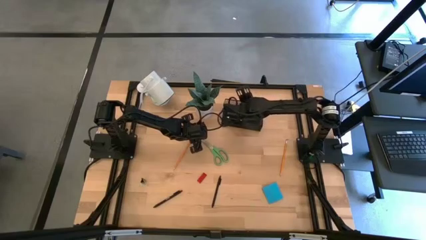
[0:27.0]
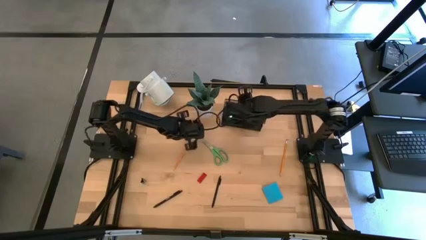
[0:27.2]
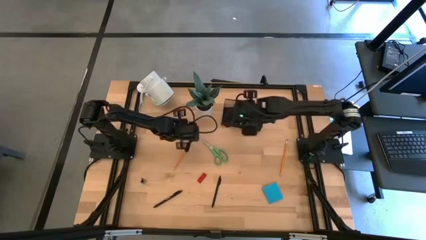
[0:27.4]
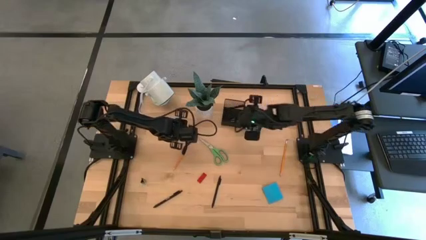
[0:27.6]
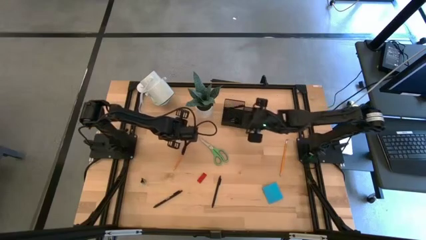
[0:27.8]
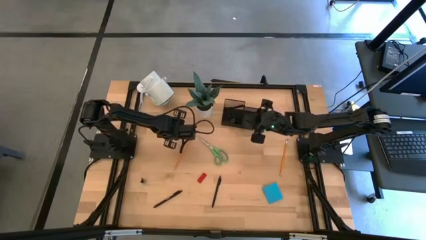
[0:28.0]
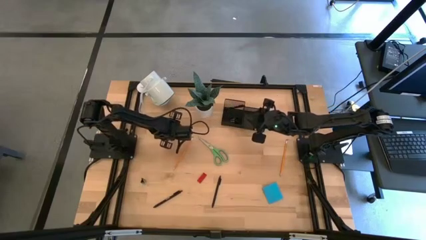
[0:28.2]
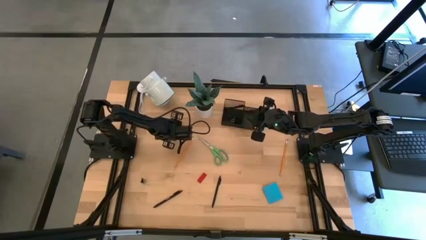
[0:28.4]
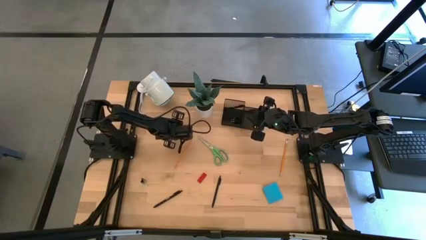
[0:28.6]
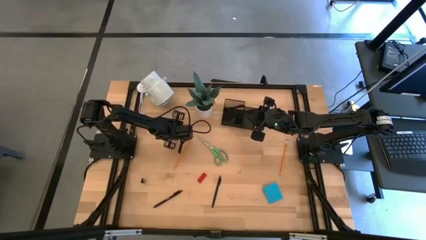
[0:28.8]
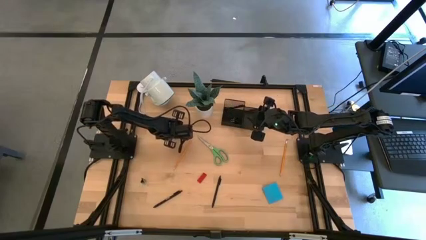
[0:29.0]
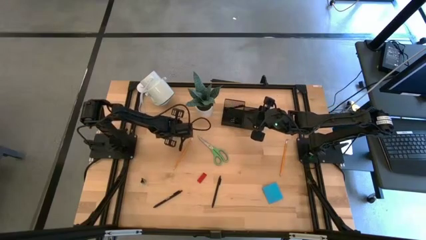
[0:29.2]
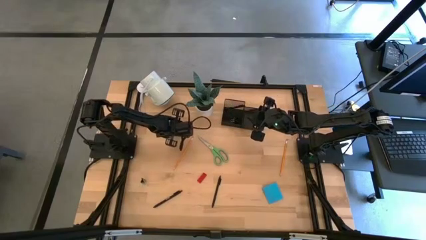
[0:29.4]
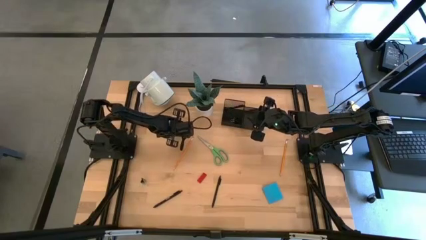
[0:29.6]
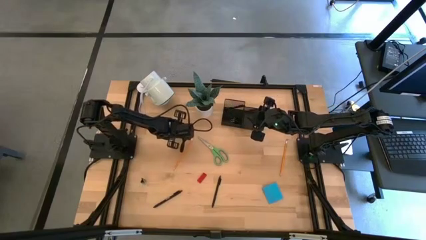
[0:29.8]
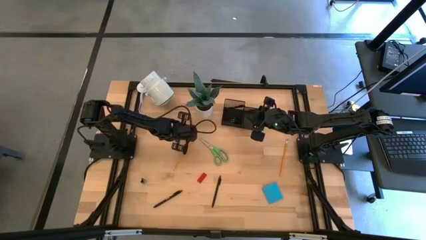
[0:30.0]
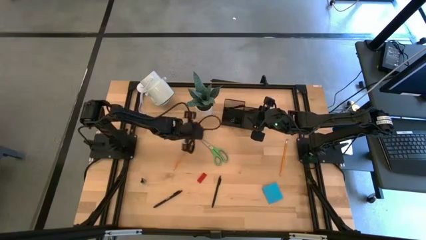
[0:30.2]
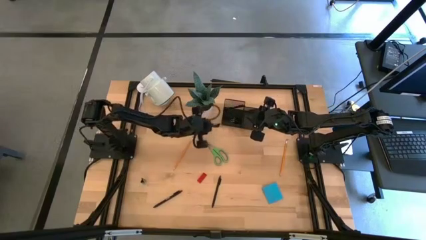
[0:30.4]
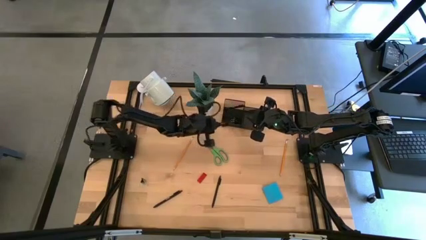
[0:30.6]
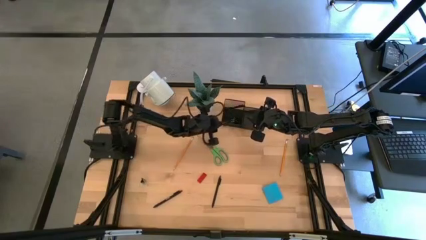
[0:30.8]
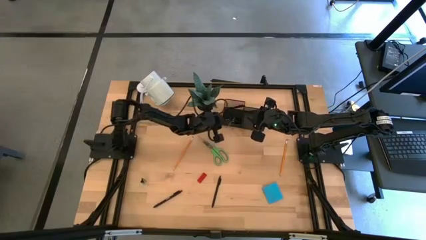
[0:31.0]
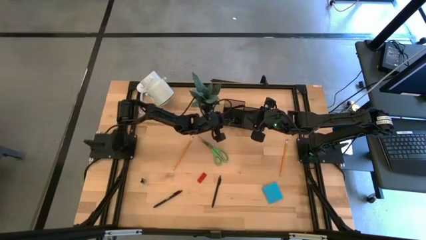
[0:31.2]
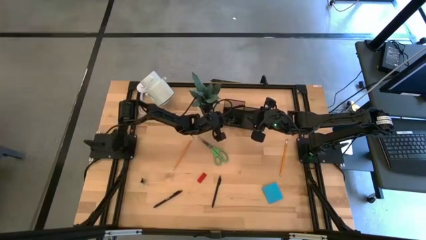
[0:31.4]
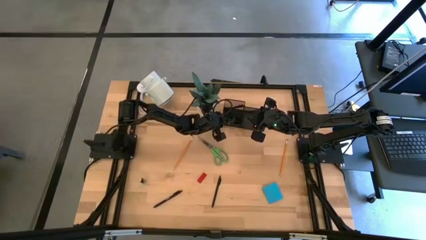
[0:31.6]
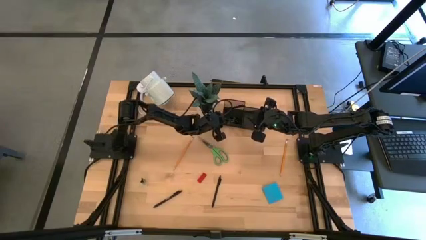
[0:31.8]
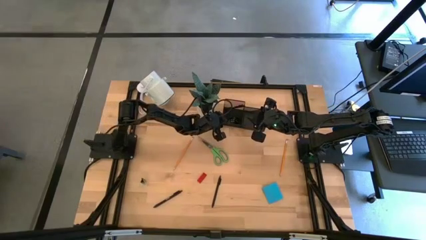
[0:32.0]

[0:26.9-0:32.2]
Task: Pick and place office supplies into organizer
Put the top black binder clip into the desk organizer

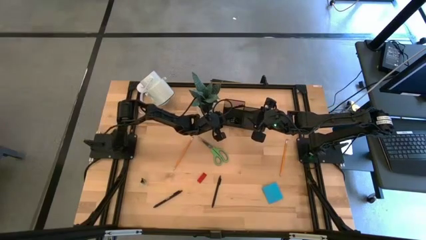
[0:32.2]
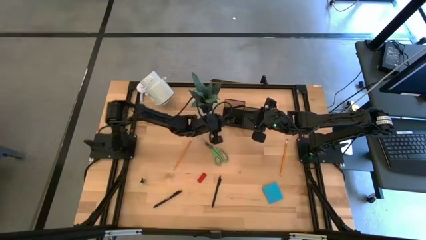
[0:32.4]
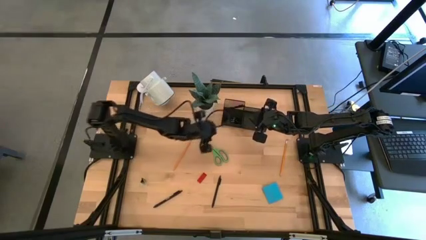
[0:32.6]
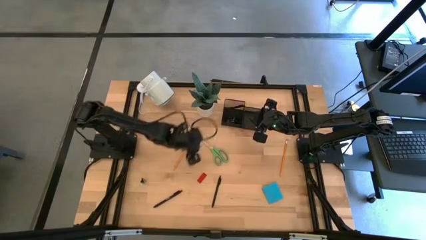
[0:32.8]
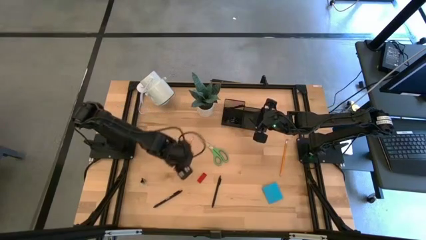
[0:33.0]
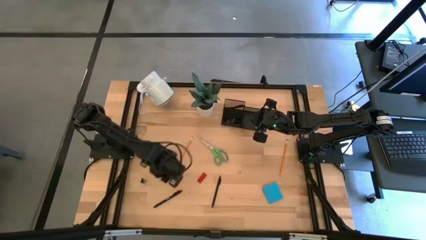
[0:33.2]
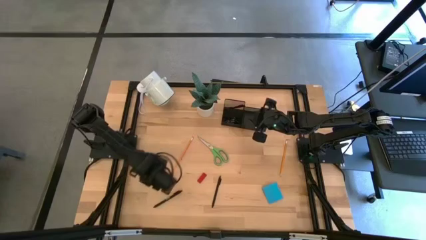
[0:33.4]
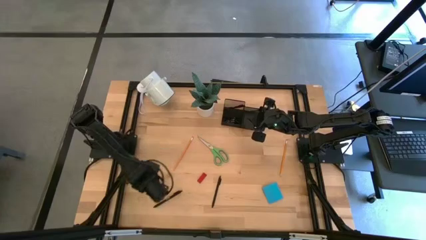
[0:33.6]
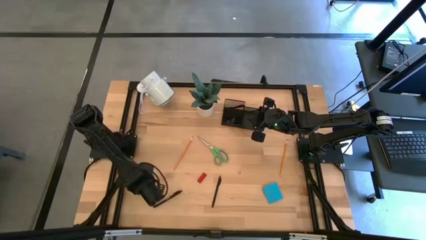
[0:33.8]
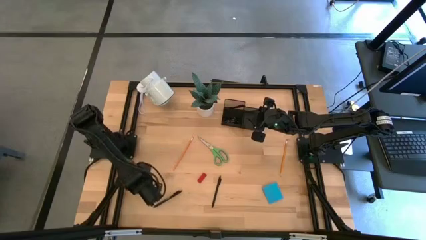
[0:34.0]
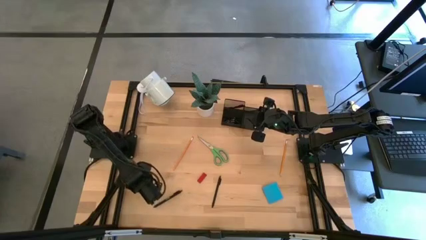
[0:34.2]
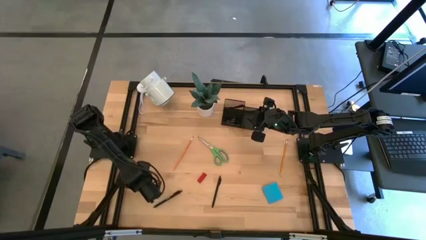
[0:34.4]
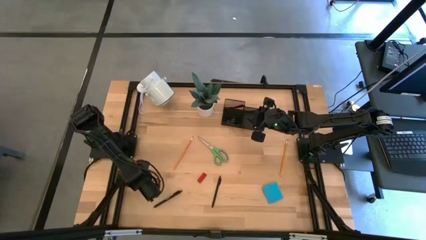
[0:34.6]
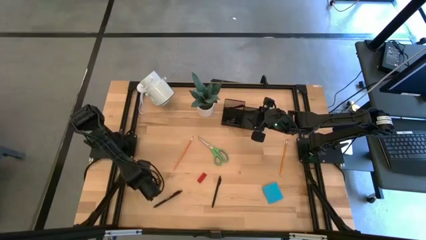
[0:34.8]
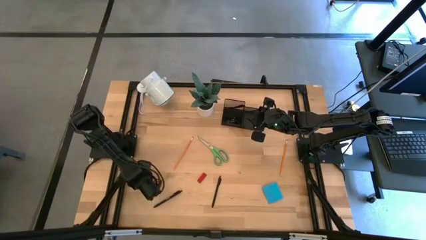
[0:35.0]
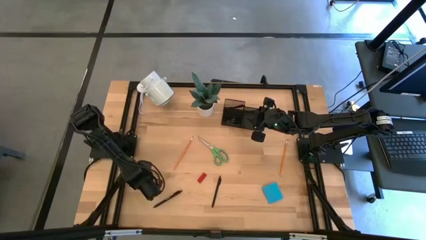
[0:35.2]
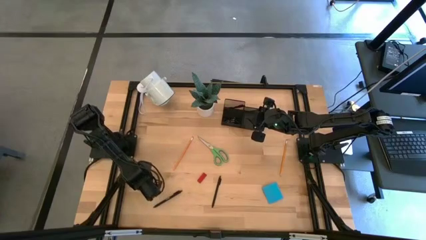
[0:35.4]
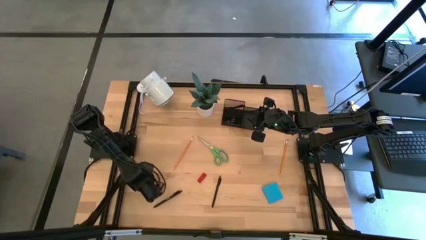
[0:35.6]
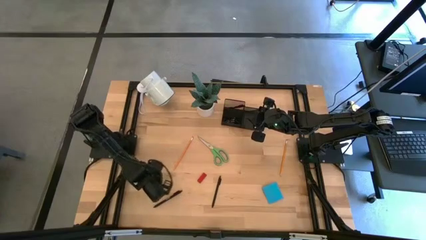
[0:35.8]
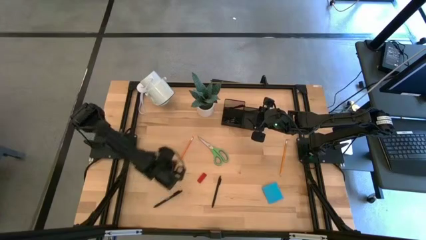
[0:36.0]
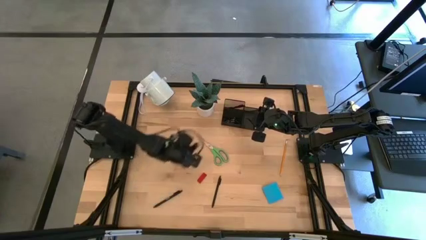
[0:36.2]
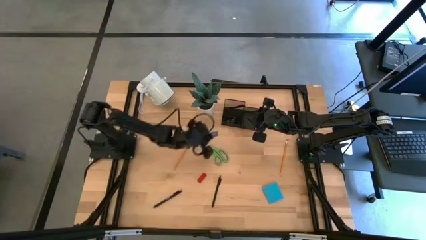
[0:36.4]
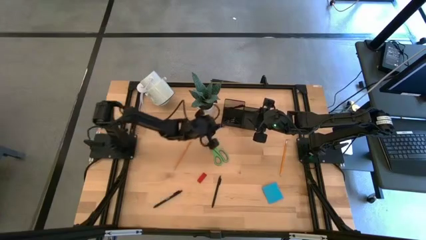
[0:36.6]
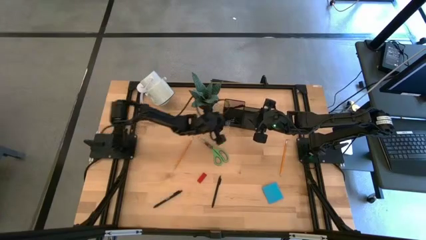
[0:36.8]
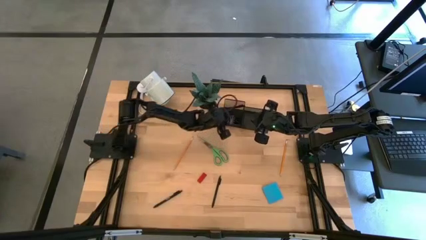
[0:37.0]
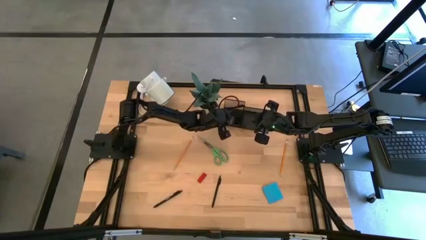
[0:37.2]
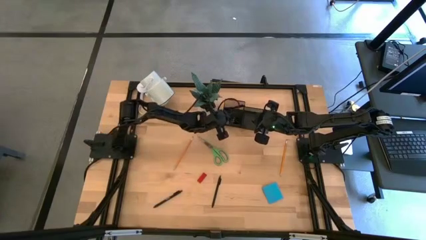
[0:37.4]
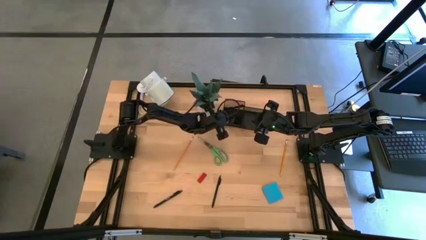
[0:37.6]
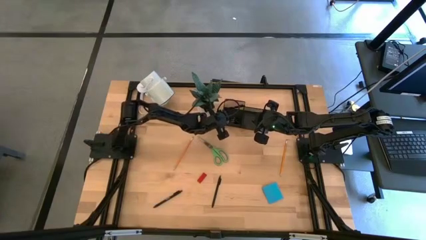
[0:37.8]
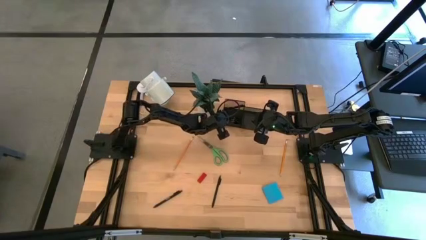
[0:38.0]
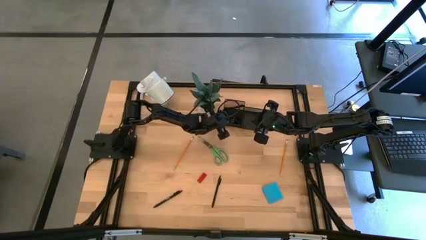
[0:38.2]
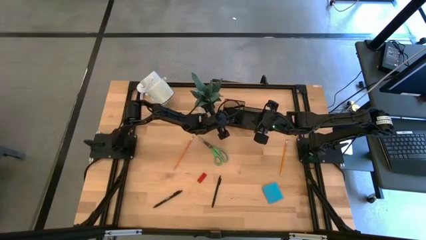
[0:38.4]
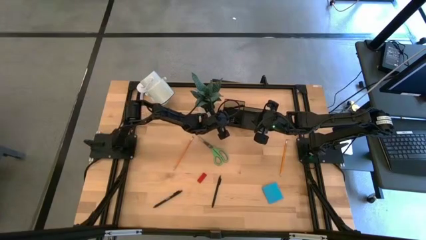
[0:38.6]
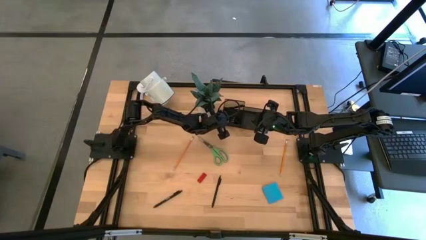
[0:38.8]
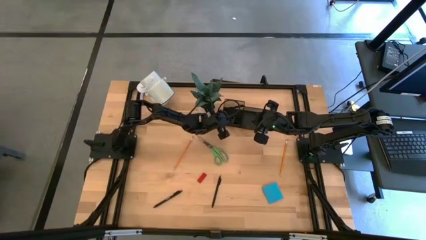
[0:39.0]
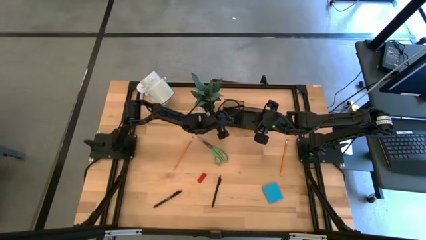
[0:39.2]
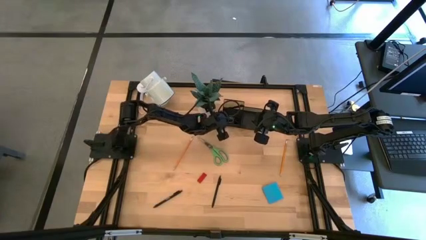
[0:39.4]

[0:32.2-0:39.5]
Put the black binder clip into the desk organizer
